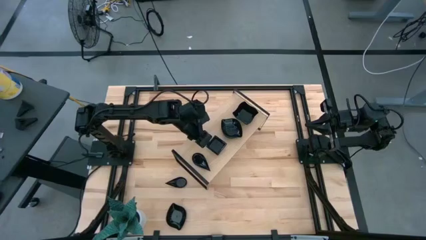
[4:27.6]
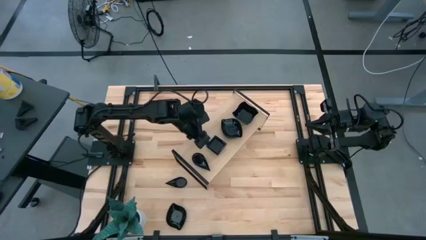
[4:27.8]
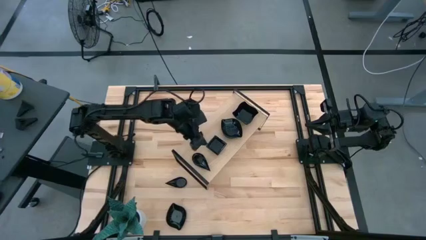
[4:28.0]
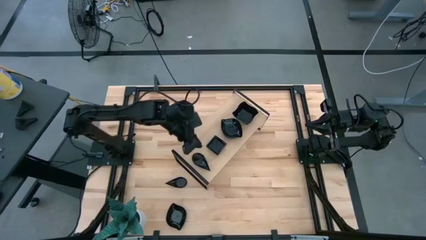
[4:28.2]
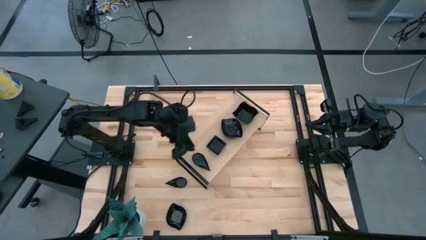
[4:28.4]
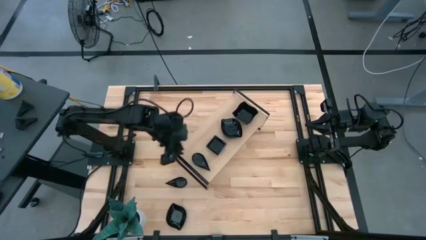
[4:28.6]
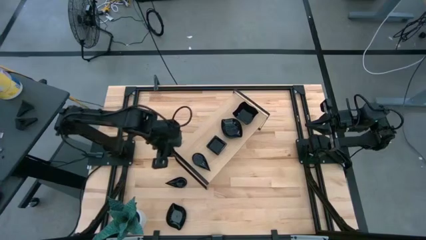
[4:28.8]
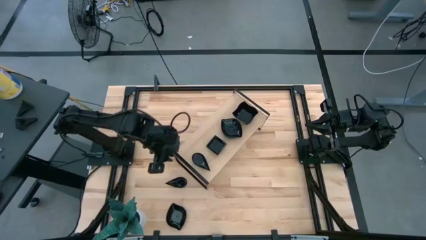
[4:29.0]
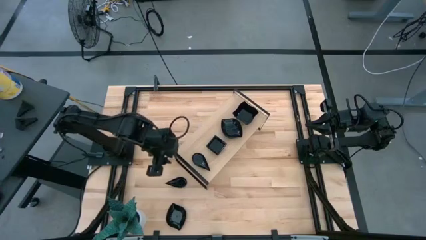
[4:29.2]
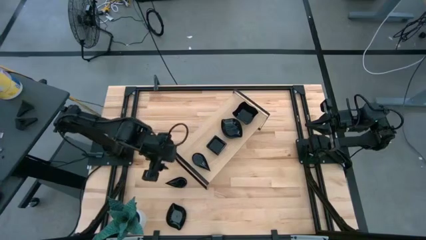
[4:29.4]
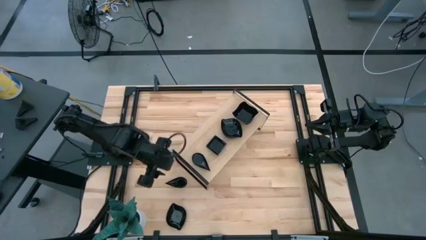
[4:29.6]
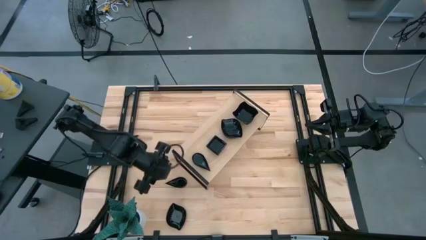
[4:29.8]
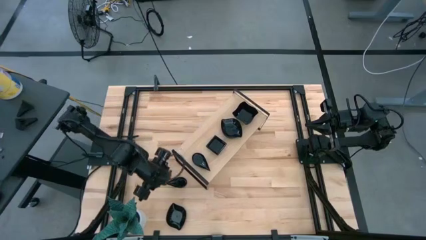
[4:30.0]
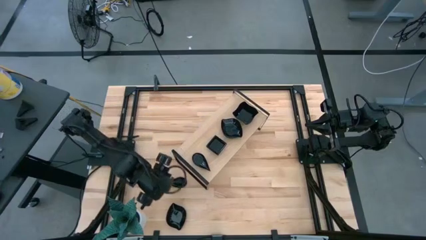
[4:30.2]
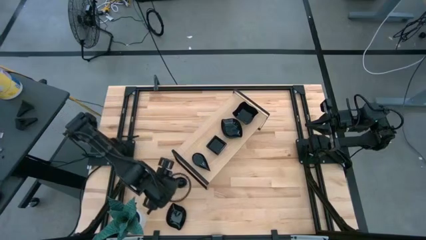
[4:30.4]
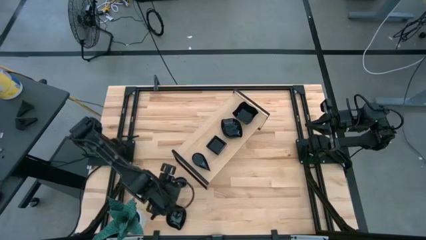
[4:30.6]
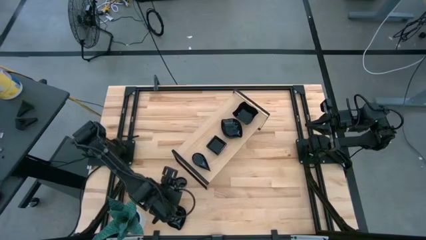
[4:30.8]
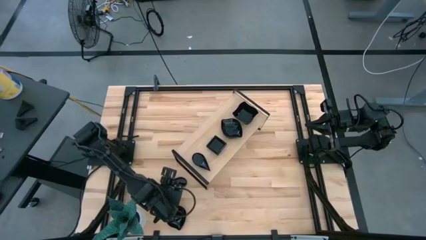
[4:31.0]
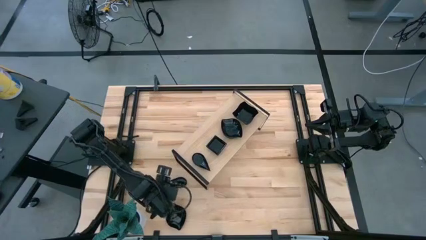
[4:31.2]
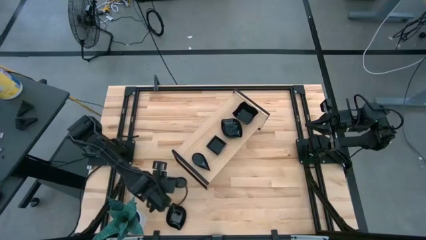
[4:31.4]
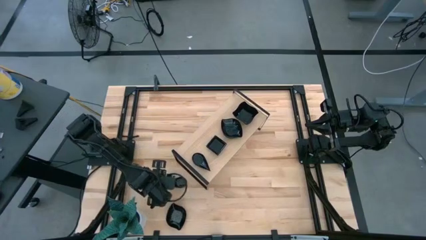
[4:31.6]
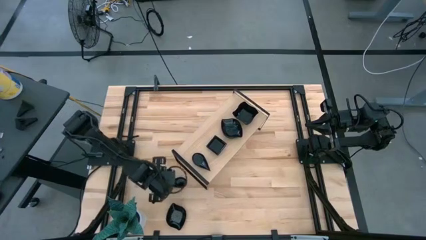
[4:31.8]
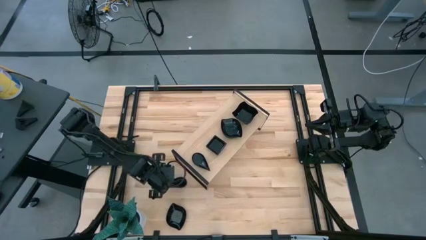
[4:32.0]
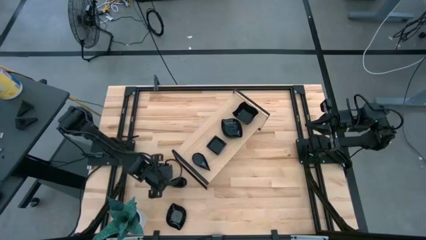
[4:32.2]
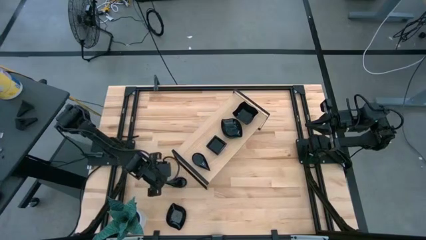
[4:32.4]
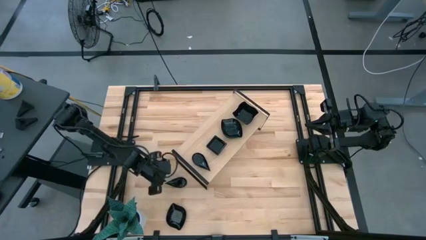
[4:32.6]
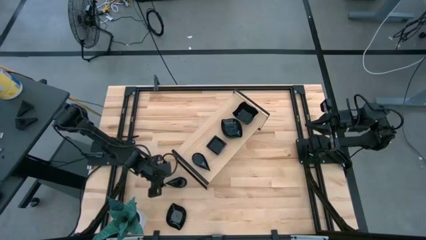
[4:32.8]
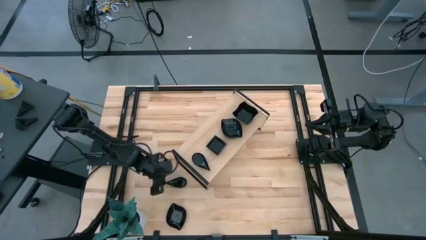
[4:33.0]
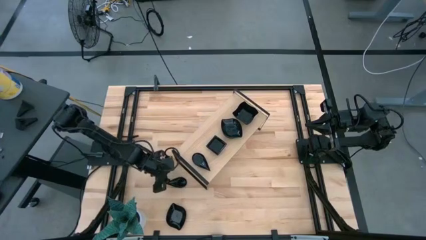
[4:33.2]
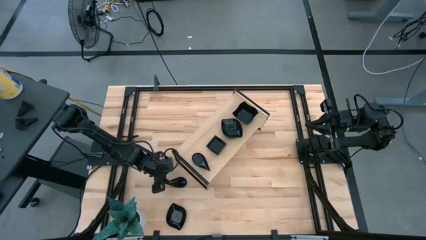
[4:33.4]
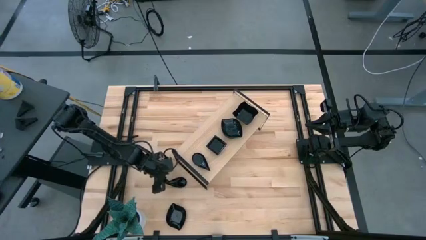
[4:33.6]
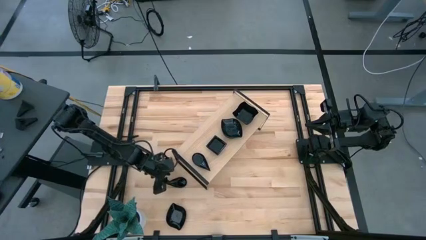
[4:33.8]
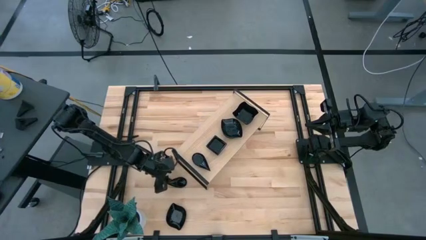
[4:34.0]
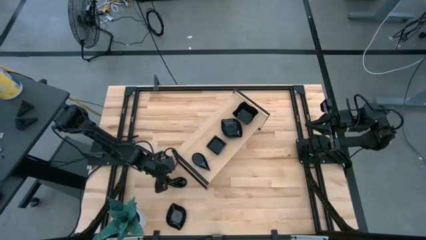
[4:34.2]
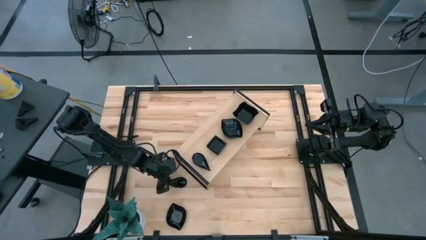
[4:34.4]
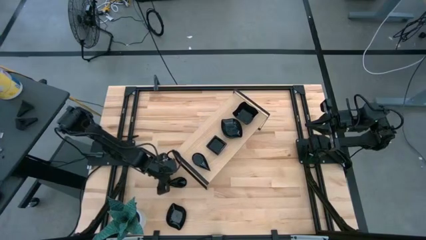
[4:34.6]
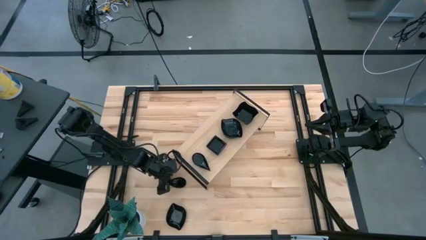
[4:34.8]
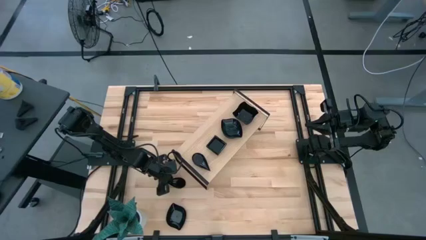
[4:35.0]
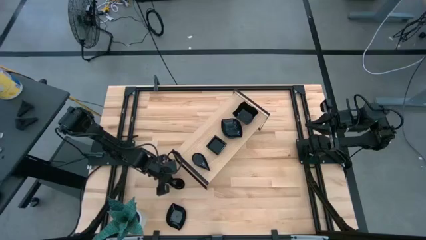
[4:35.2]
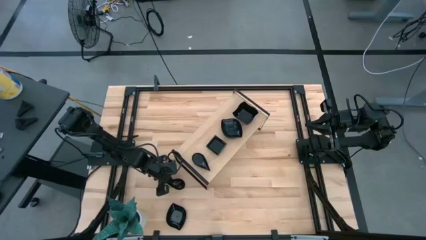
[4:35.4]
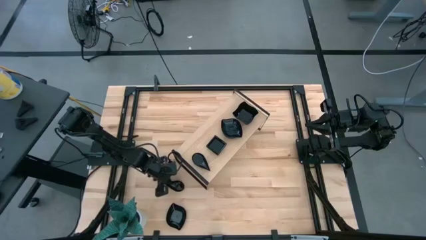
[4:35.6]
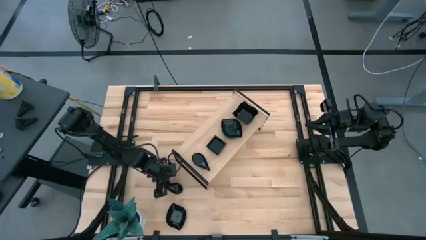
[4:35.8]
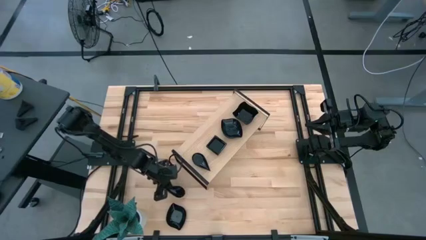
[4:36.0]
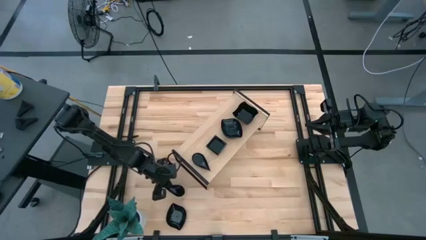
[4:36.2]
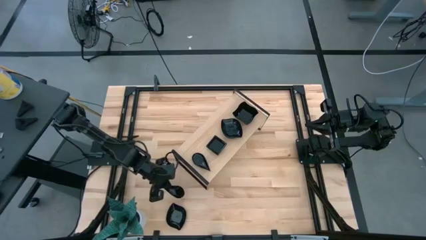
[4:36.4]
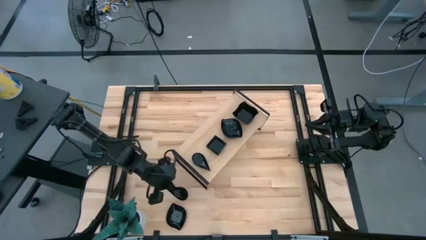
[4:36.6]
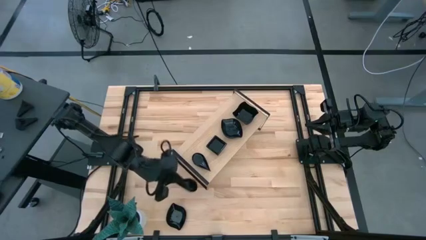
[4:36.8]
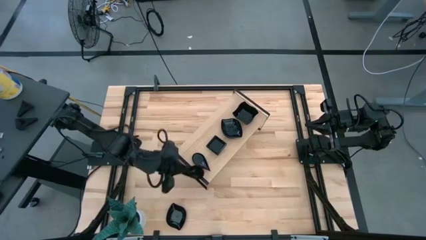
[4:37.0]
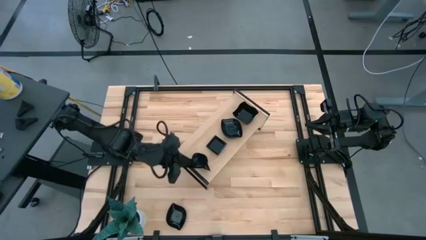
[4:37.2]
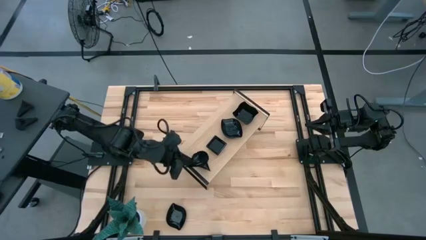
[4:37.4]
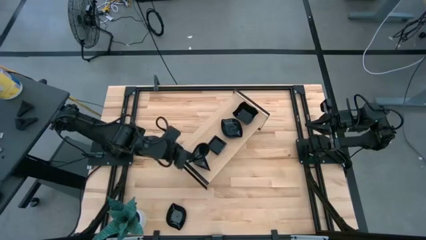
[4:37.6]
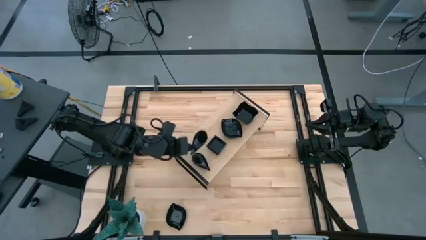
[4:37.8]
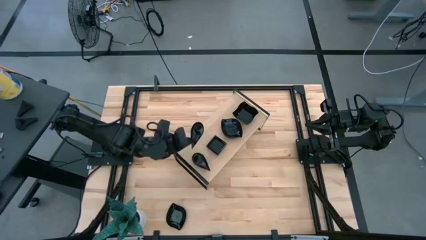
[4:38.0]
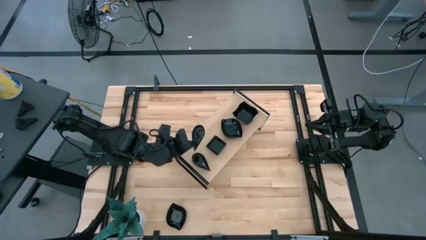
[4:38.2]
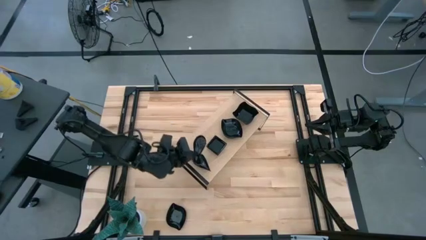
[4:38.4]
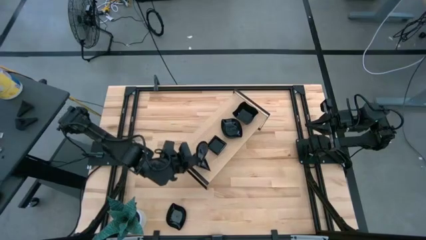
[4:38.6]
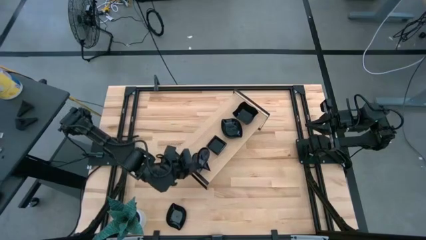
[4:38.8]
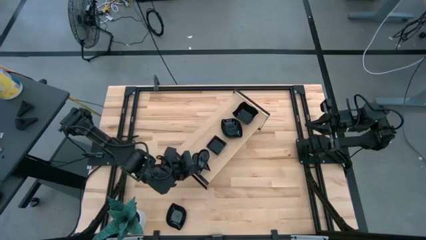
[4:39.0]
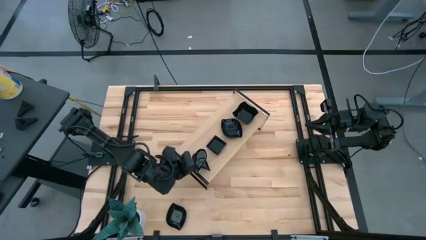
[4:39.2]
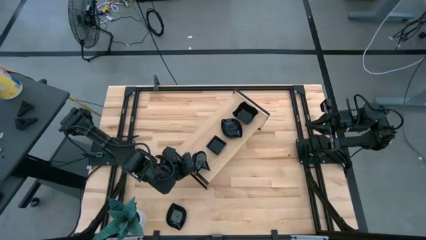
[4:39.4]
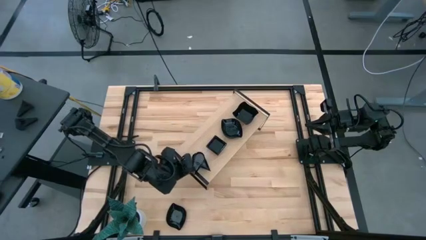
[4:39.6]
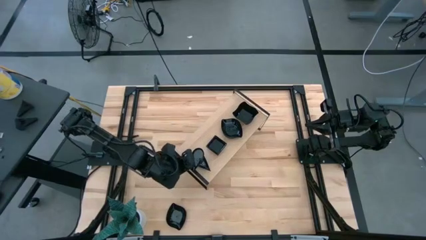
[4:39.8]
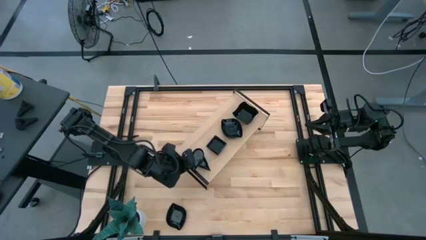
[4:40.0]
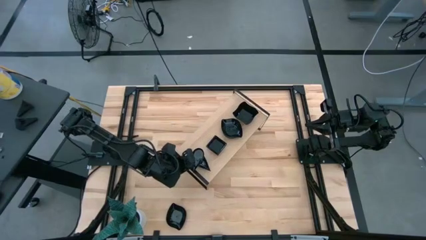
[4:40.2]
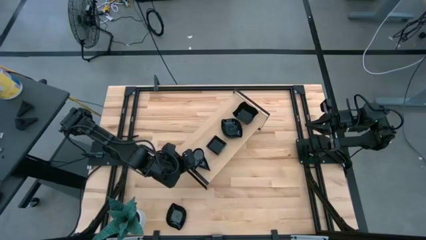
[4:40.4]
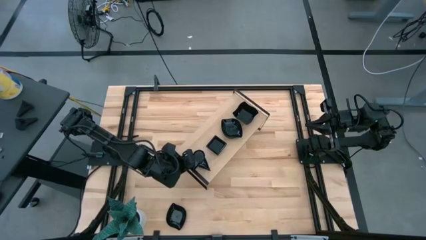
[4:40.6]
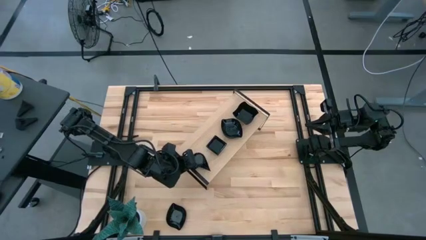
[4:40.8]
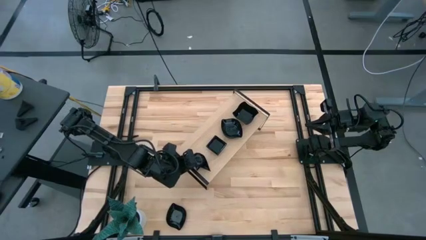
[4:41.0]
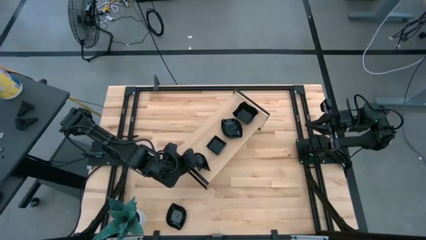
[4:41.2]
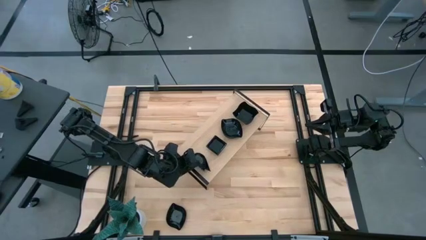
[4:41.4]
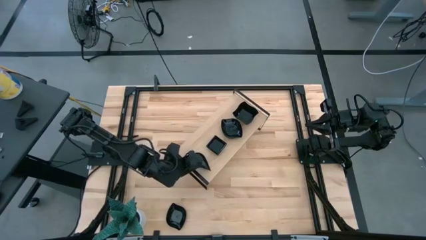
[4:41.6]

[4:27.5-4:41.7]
Task: Pick & Place Mini shaped plates
Stack the black teardrop shaped plate on top of the black teardrop shaped plate on the shelf
